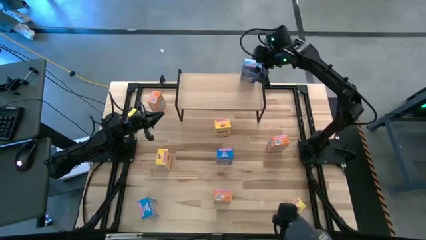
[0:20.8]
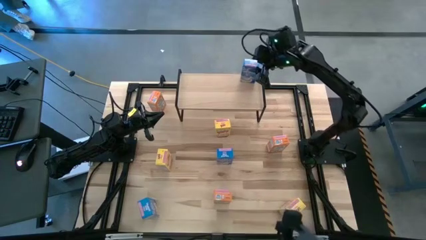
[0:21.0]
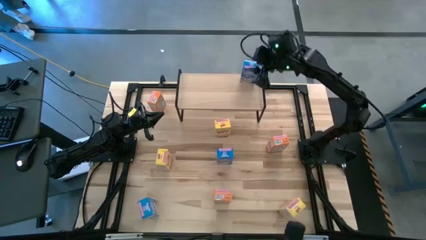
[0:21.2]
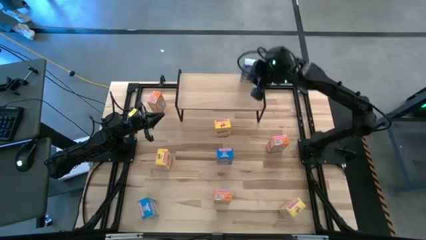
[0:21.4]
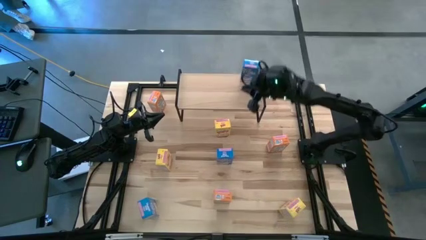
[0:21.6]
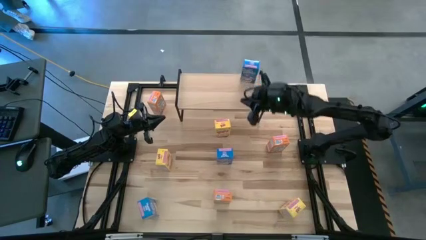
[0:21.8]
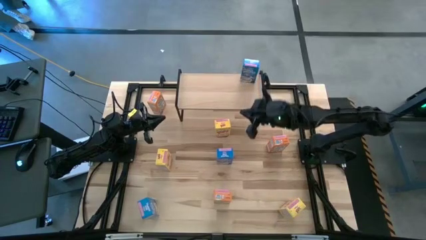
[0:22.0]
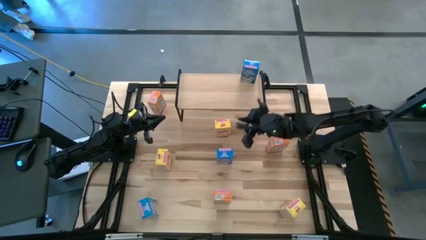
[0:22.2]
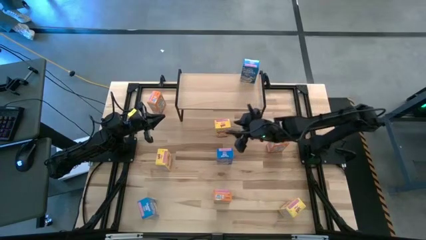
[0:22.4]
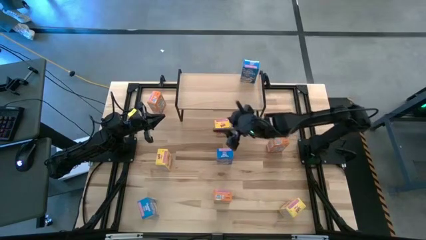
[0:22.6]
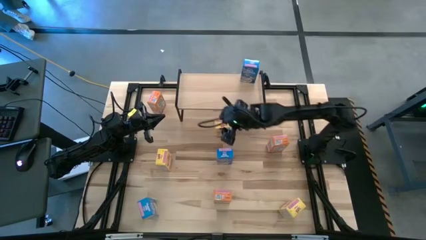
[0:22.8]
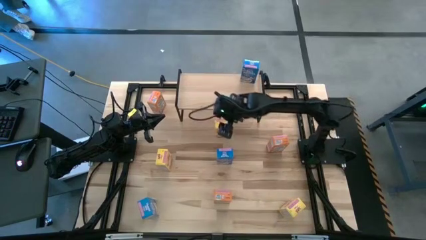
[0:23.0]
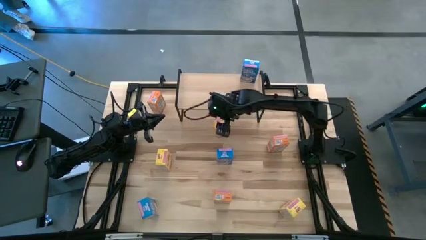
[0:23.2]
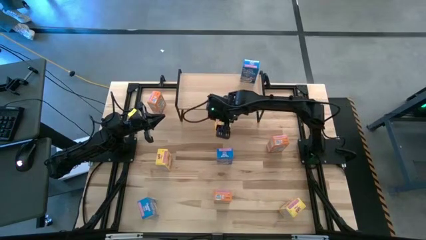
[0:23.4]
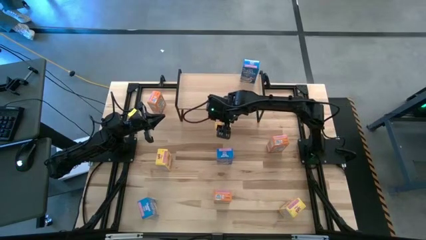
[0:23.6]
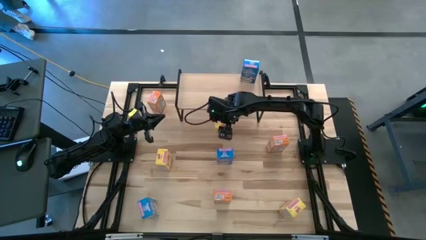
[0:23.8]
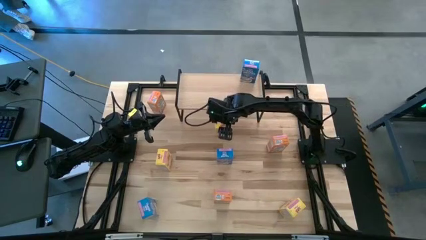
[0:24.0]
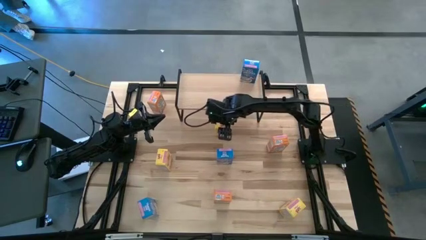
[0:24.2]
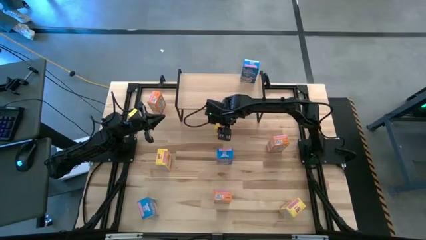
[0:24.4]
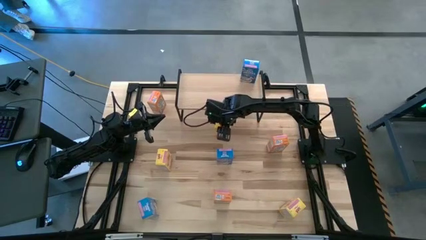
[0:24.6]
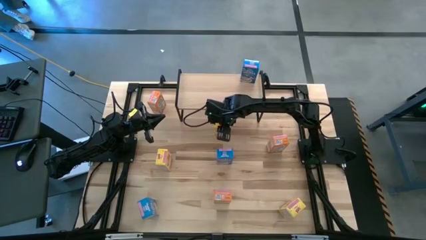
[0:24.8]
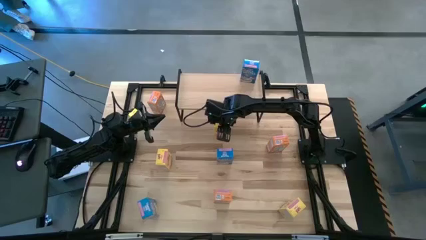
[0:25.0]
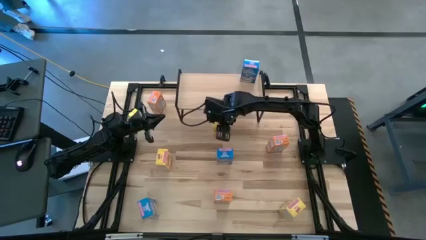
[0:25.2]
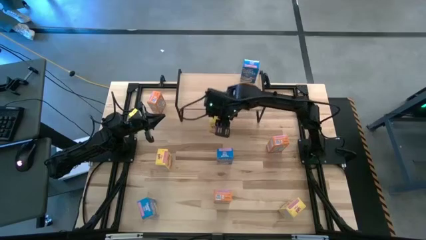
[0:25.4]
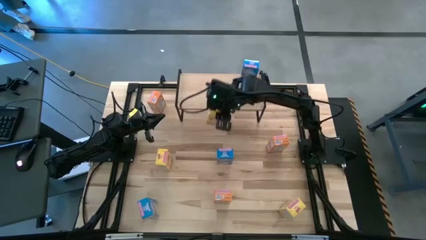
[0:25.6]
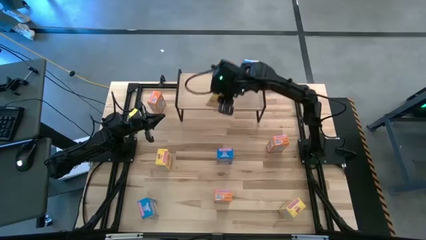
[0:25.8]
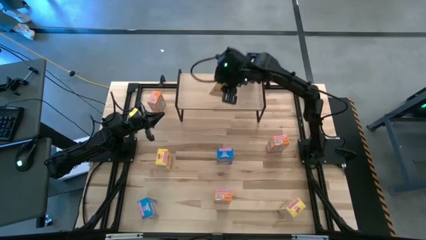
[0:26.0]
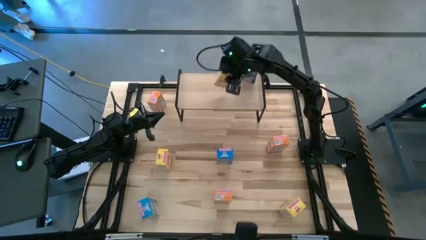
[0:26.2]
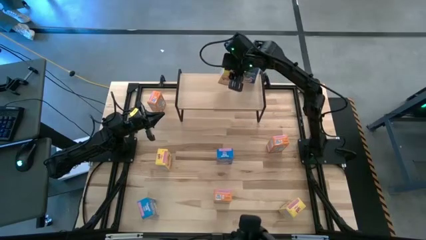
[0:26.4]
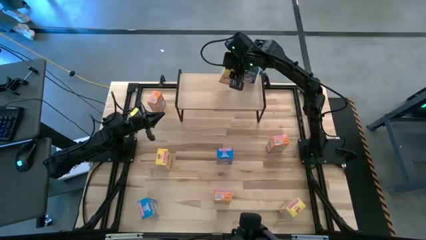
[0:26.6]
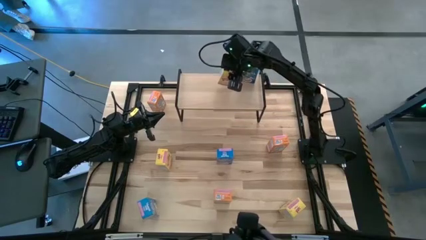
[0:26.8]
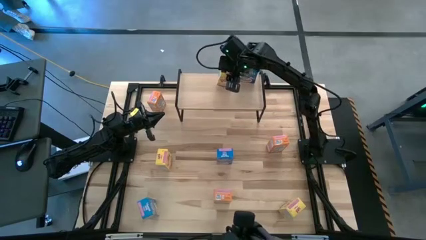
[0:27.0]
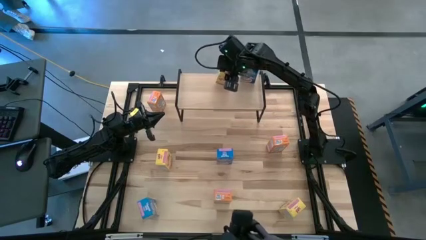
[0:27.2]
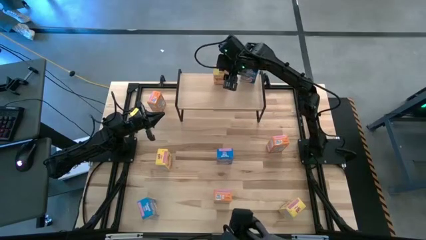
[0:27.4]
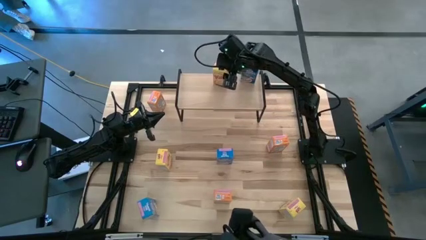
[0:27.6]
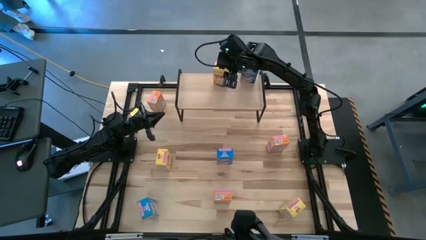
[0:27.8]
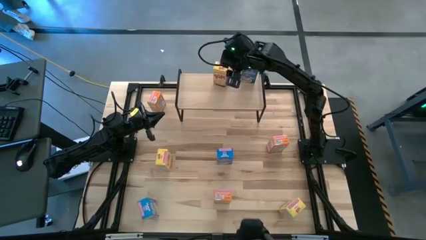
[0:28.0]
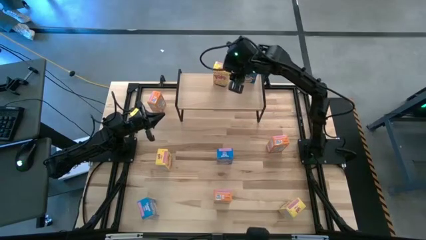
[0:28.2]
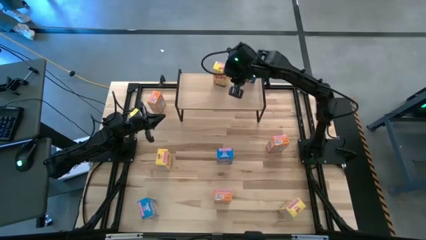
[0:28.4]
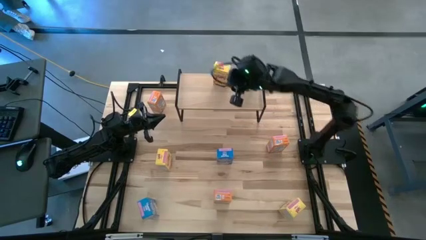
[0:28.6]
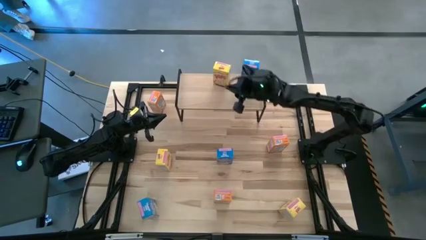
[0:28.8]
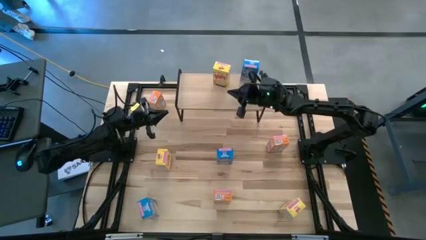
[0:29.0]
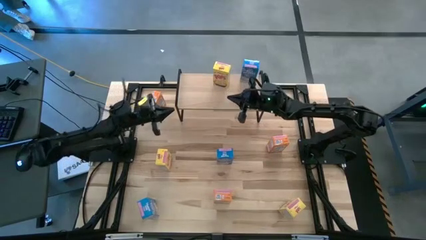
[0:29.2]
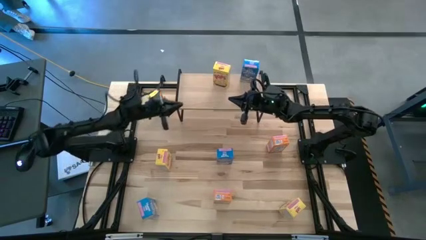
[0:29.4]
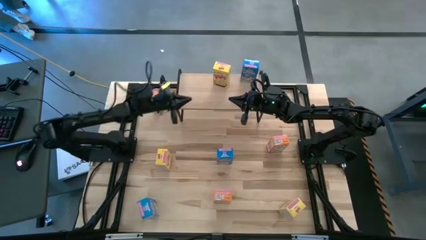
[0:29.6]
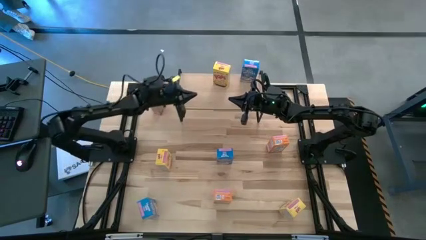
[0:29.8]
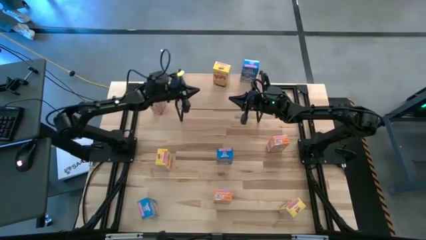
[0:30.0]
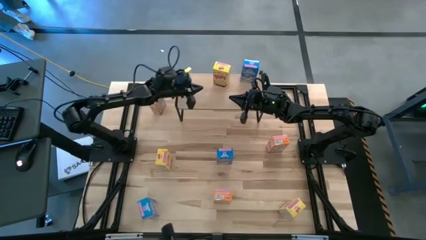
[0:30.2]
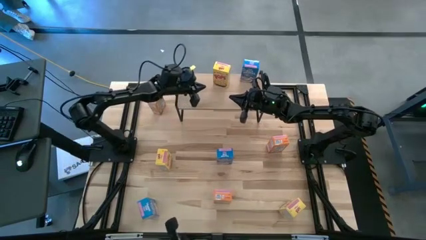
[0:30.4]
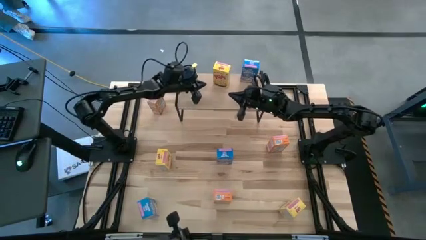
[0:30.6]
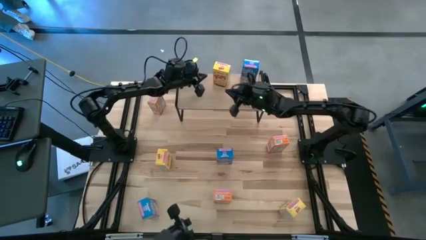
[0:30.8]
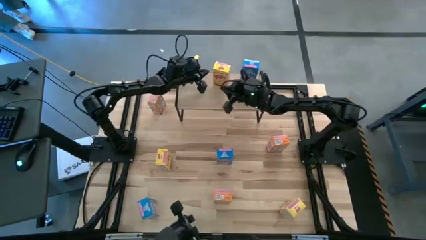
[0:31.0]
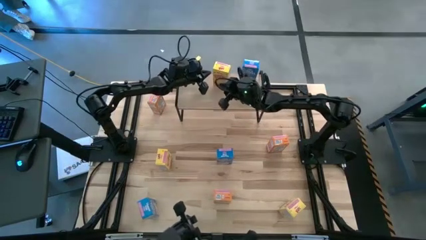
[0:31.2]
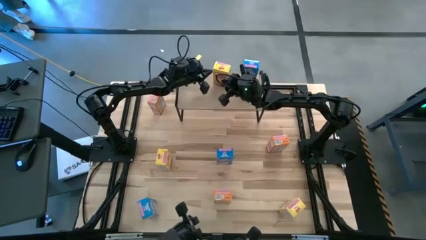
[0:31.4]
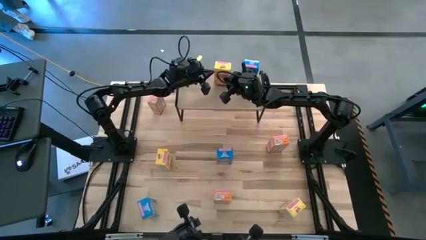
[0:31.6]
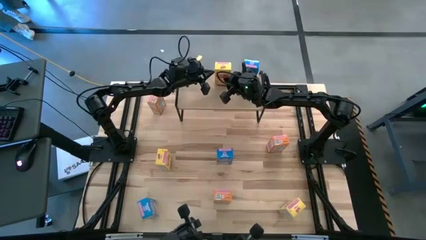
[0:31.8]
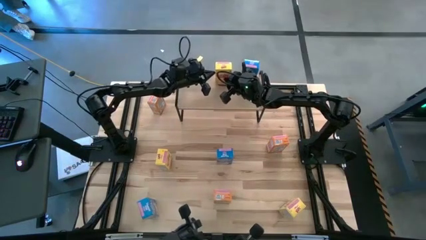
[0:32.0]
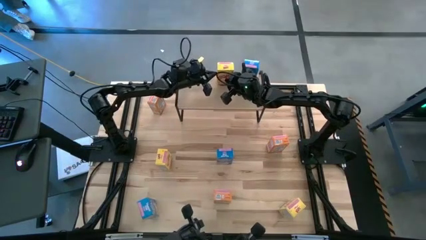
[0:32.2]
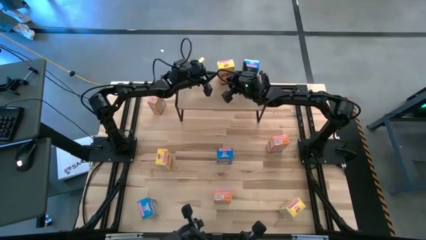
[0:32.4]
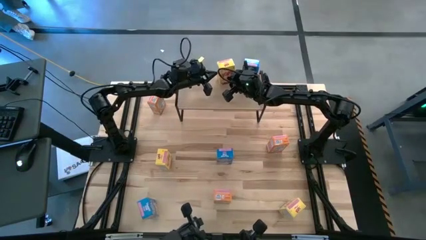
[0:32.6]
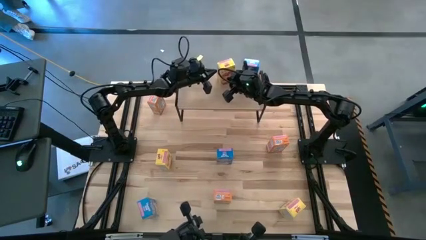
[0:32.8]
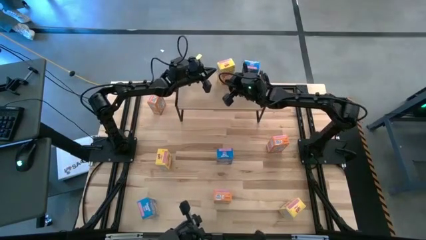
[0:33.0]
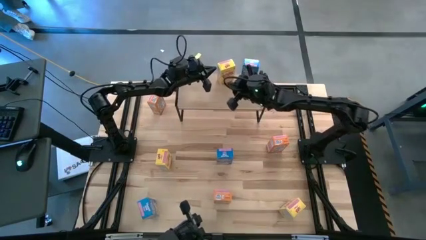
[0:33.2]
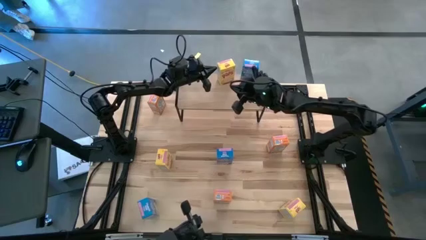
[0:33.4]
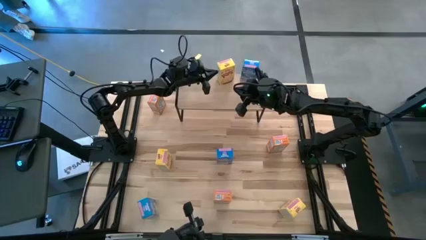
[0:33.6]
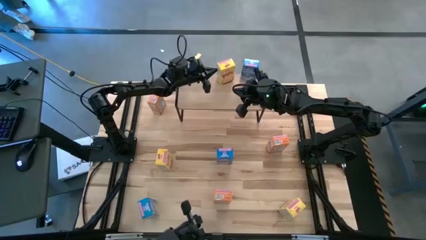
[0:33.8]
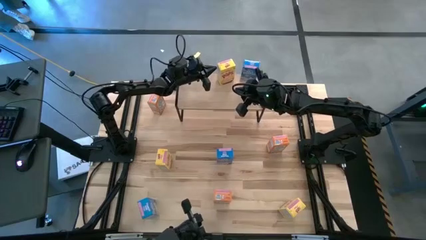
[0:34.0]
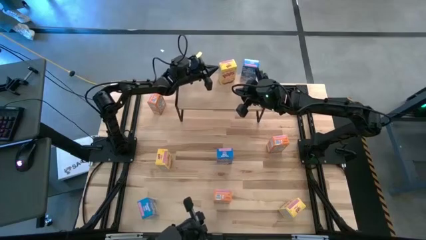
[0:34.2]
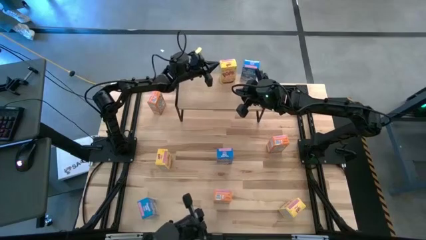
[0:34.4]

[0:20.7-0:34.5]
Task: Stack cereal on shelf
Put the top yellow cereal box on the shelf
